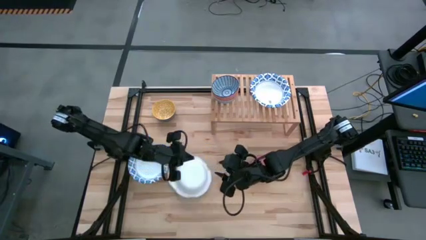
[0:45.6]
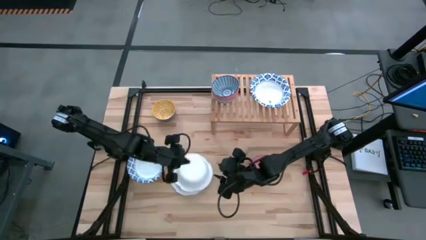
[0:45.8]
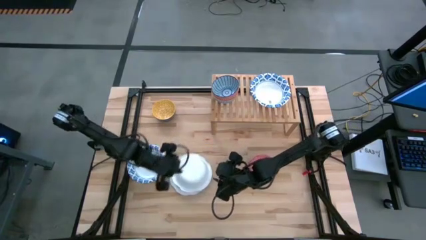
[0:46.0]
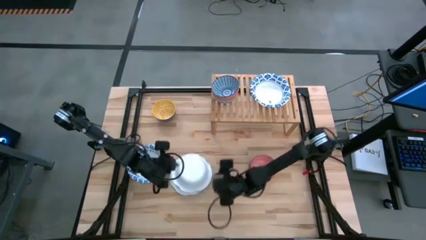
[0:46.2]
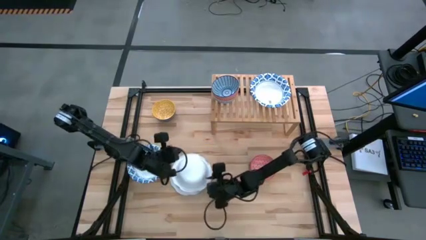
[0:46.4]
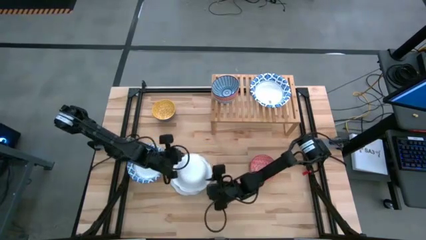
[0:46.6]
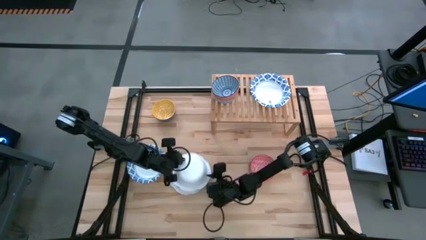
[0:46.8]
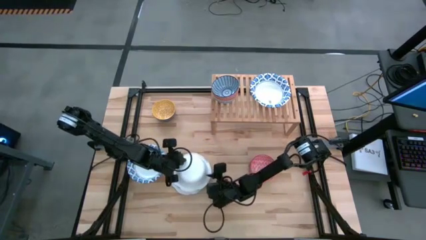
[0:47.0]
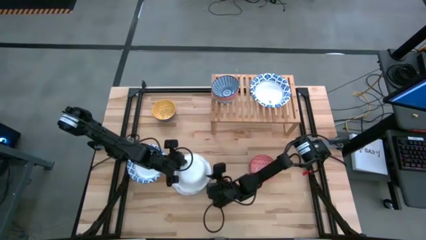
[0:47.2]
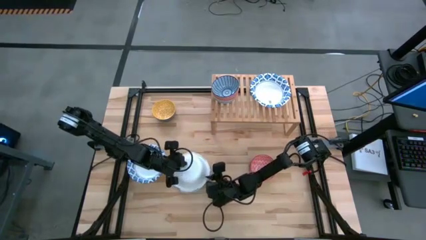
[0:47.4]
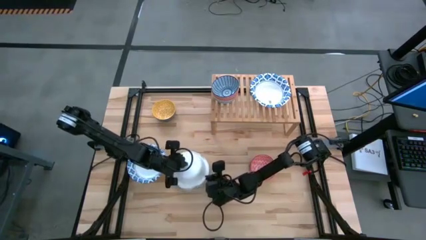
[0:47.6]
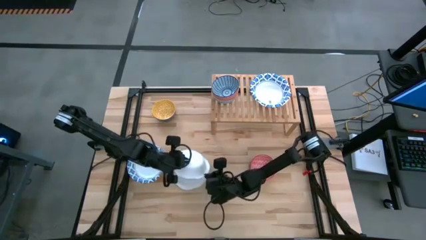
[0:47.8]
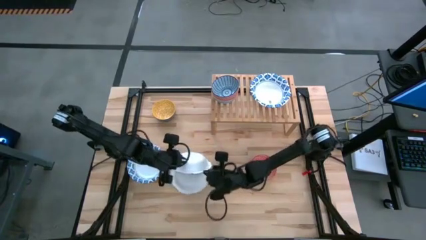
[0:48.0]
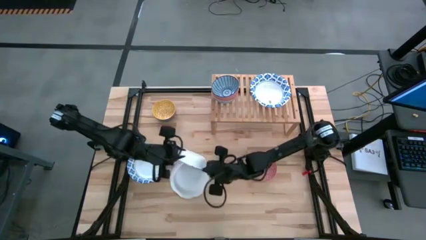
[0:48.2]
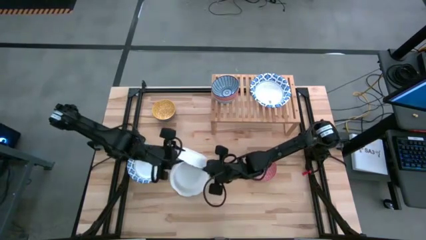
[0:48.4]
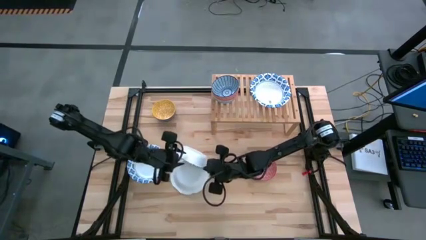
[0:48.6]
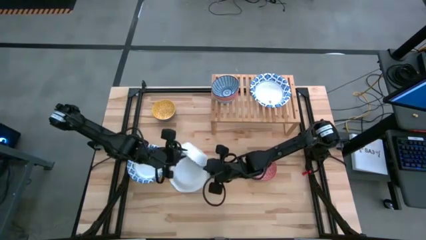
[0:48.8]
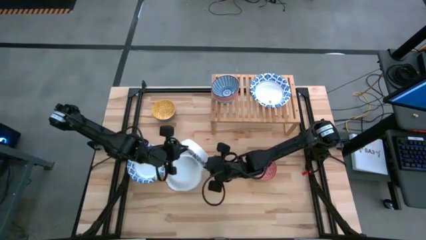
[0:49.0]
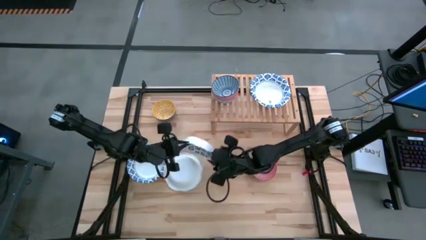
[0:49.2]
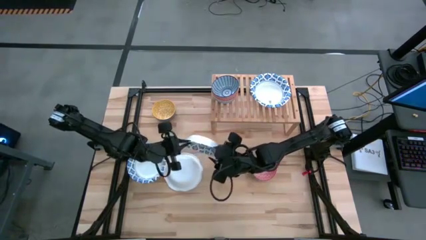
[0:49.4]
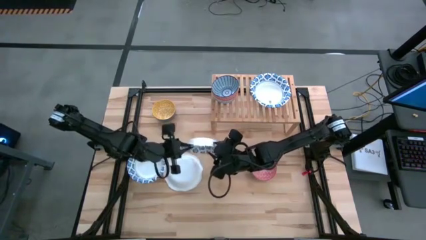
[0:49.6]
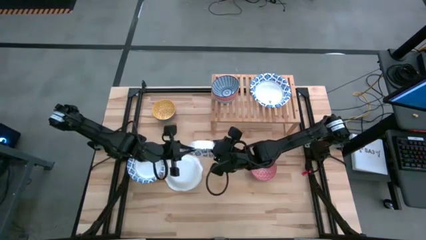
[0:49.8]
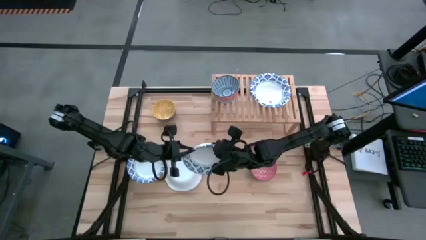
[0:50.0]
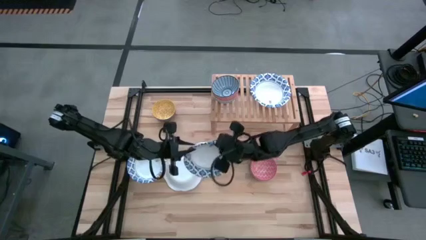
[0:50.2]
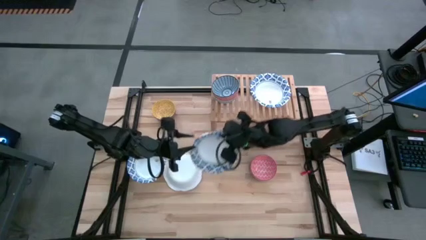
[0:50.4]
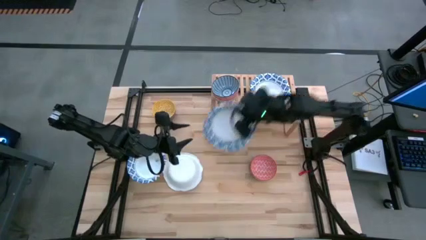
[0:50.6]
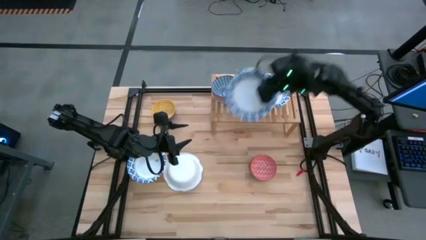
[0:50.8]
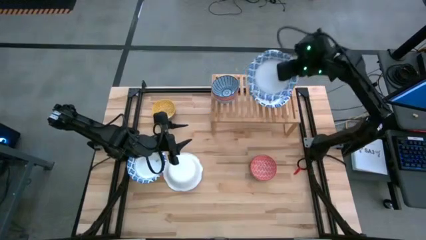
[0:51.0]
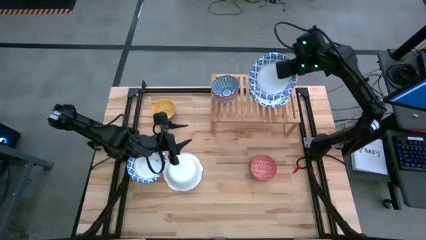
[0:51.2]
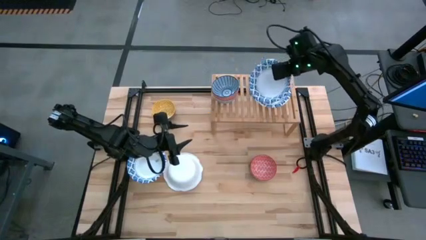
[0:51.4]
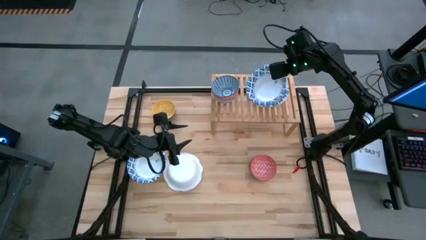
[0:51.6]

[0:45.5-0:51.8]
Task: Place and stack bowls onto a shelf
Stack the white patterned bowl on top of the white patterned bowl on the shelf

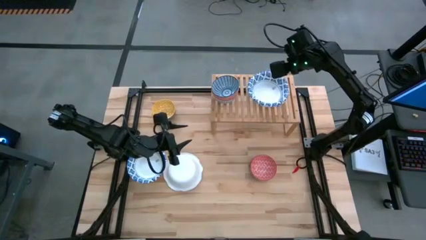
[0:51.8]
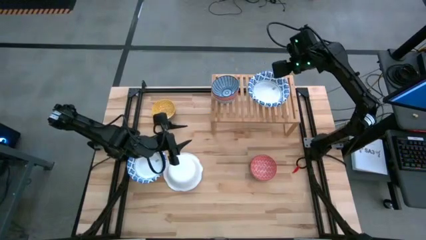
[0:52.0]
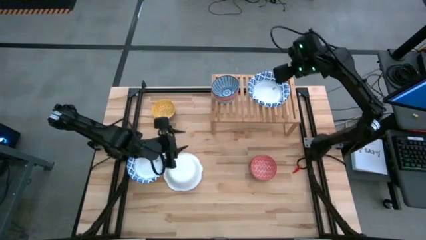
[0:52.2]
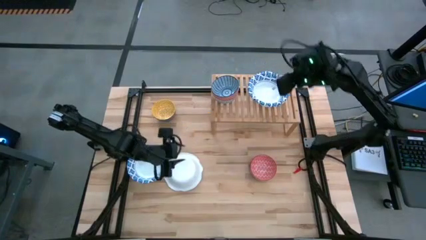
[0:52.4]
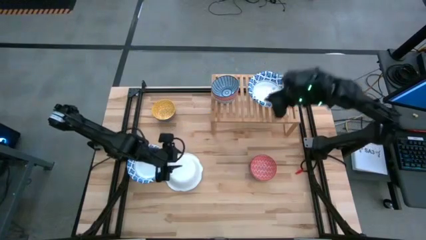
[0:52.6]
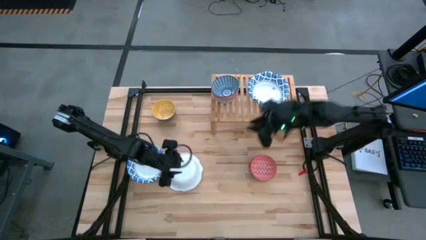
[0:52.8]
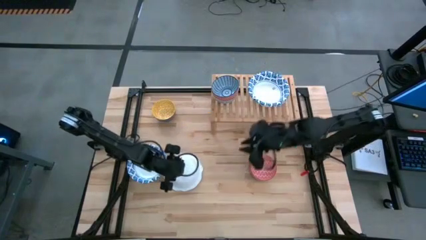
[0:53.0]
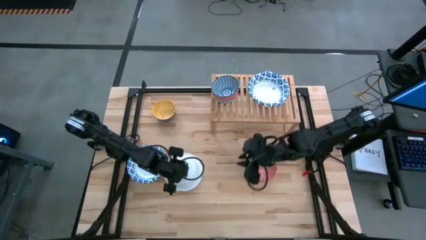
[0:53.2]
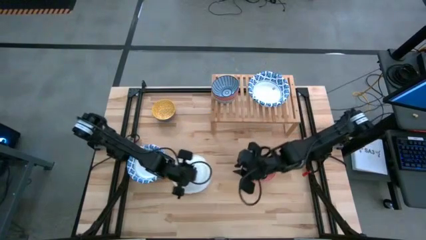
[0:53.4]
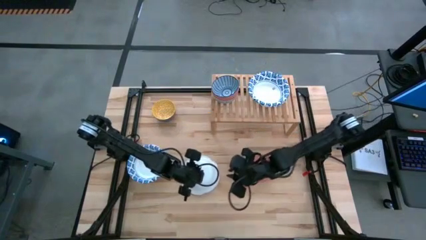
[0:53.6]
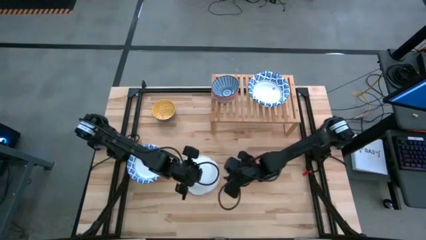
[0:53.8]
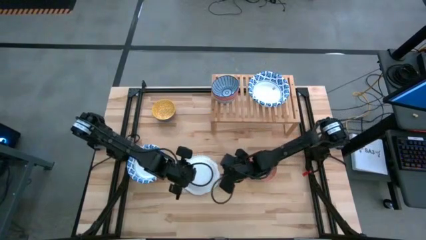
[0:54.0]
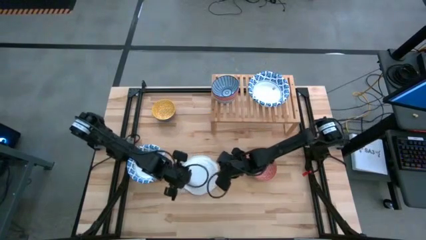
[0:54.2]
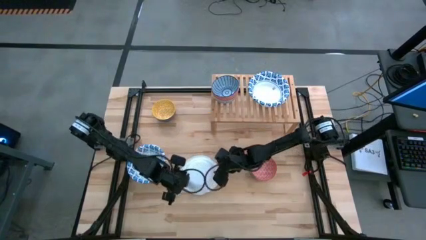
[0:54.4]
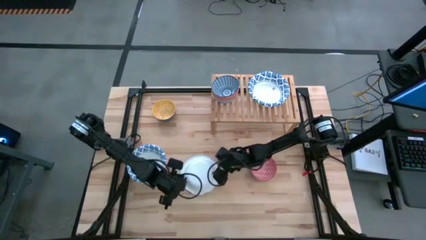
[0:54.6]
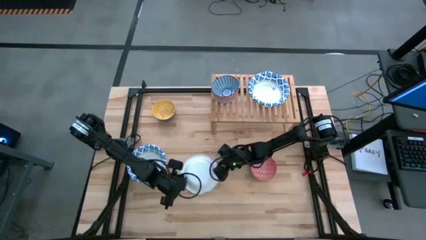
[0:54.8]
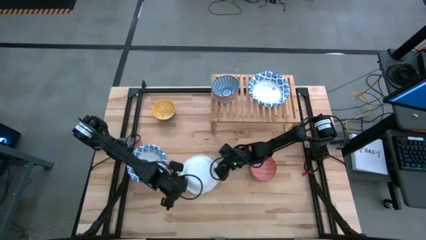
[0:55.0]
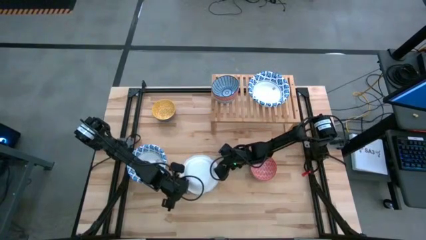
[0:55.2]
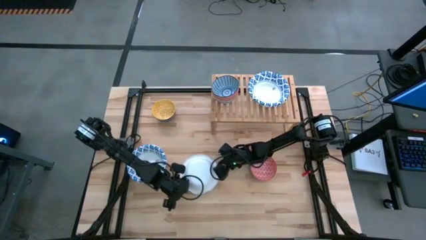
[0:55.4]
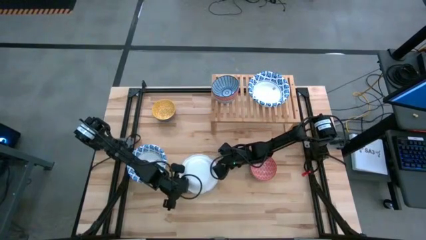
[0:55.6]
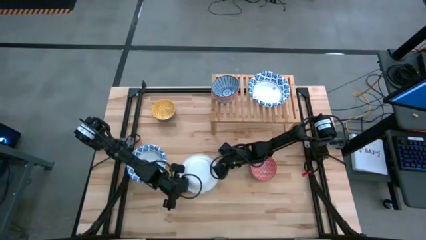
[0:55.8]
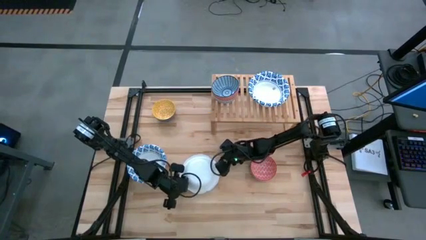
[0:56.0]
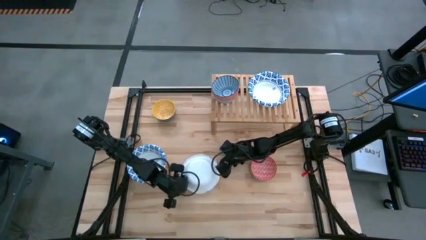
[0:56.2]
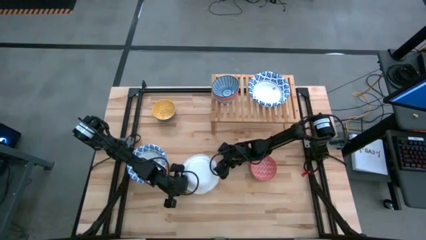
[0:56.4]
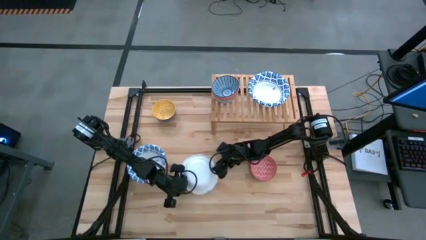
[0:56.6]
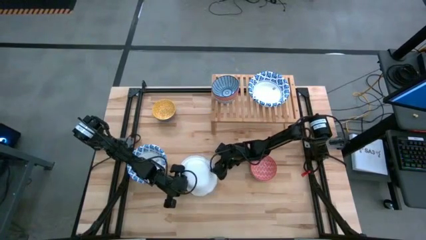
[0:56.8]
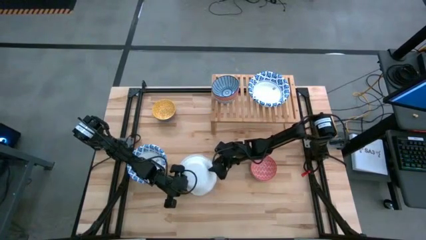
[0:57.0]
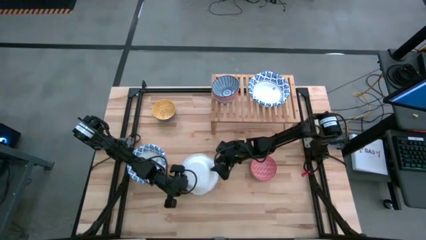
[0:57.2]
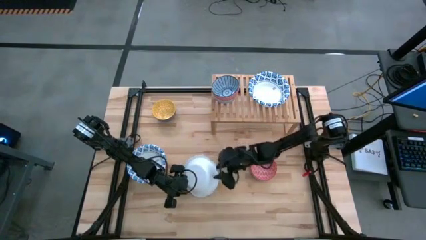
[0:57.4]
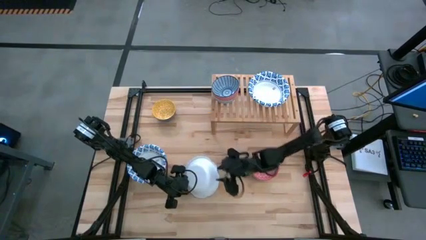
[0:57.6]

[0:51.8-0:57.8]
Stack the white patterned bowl on top of the white patterned bowls on the shelf

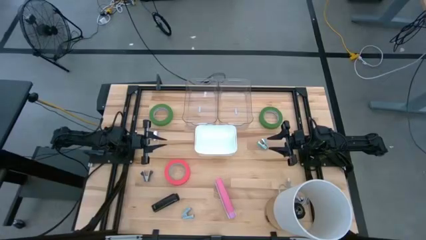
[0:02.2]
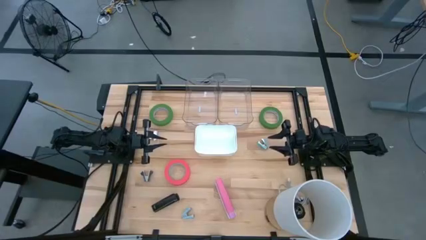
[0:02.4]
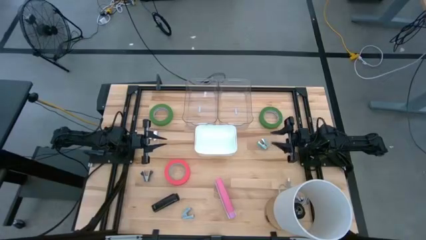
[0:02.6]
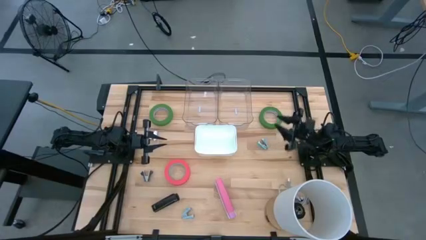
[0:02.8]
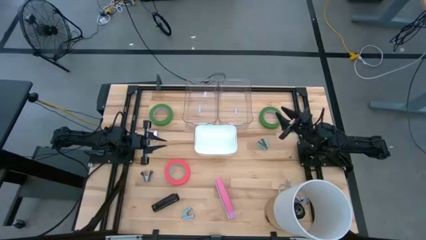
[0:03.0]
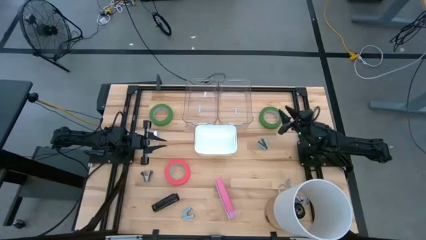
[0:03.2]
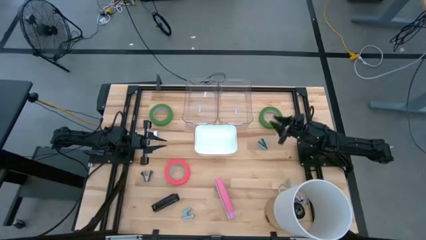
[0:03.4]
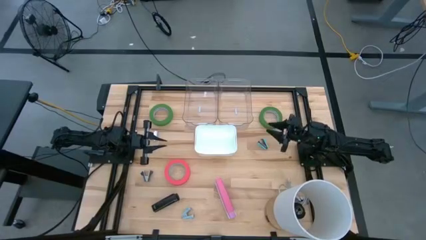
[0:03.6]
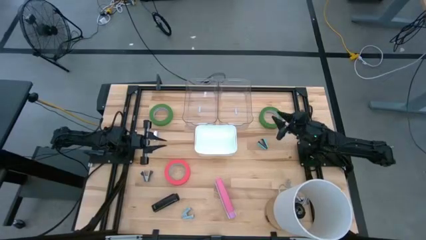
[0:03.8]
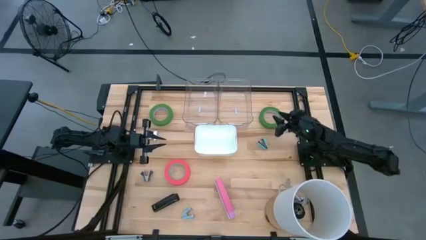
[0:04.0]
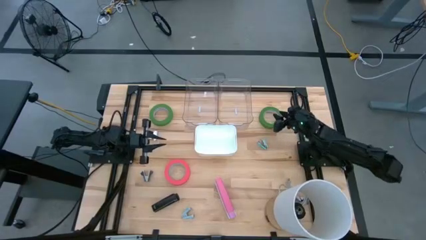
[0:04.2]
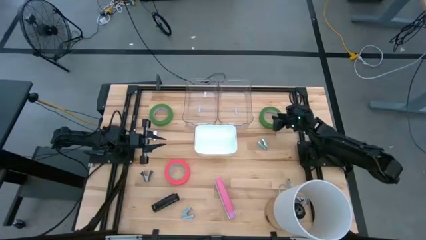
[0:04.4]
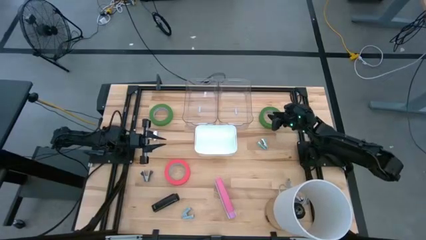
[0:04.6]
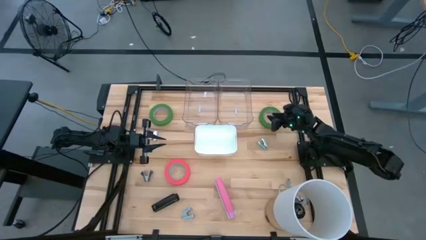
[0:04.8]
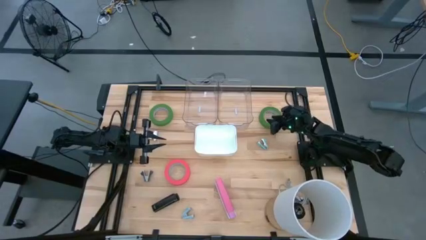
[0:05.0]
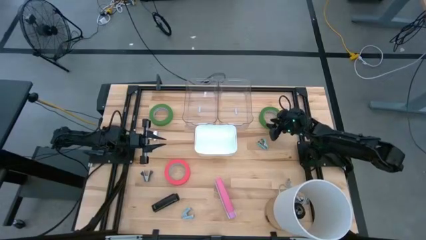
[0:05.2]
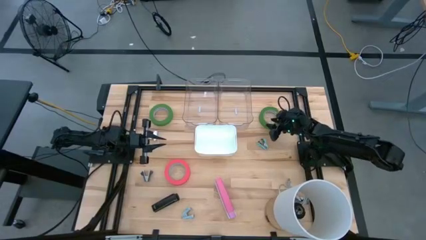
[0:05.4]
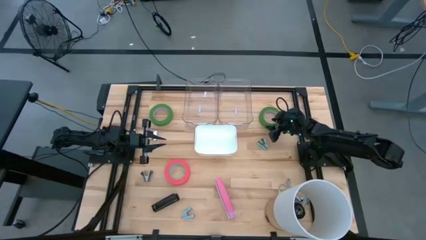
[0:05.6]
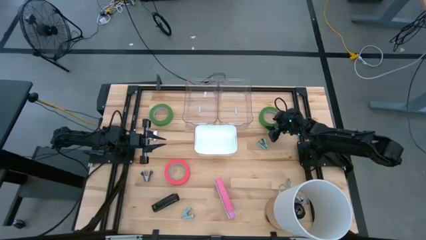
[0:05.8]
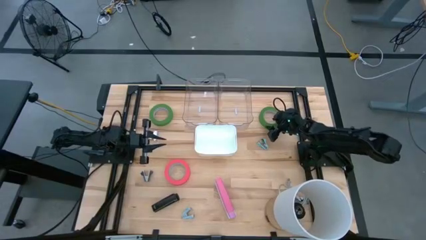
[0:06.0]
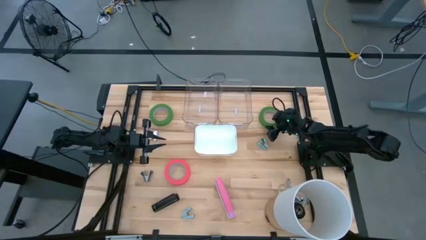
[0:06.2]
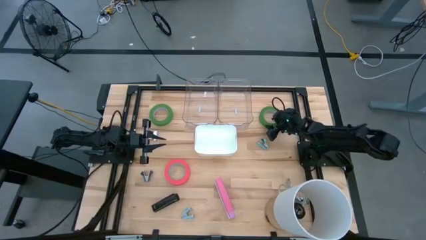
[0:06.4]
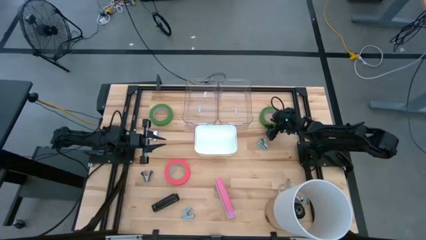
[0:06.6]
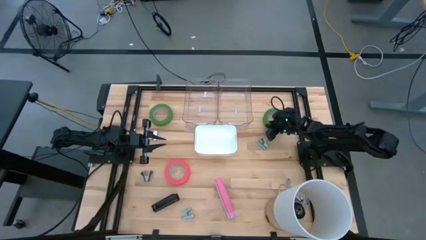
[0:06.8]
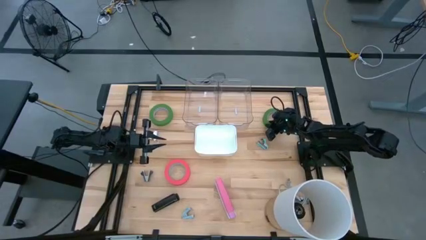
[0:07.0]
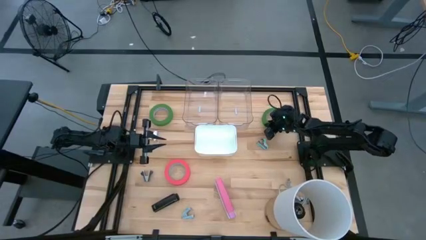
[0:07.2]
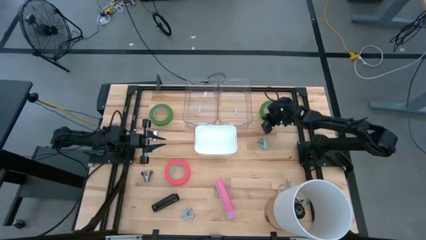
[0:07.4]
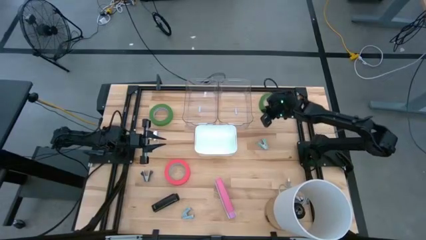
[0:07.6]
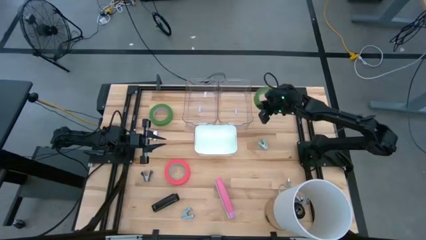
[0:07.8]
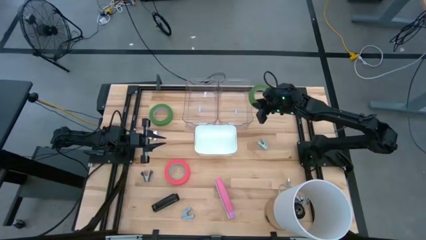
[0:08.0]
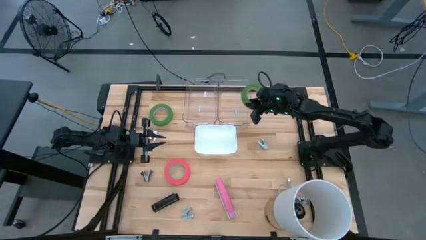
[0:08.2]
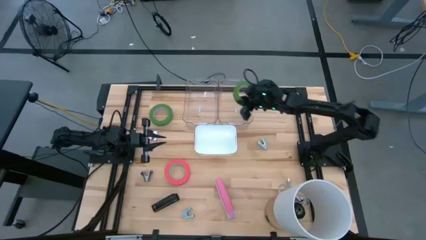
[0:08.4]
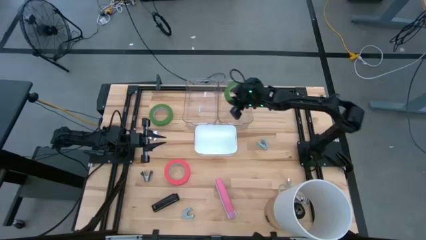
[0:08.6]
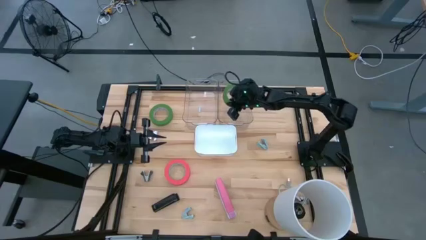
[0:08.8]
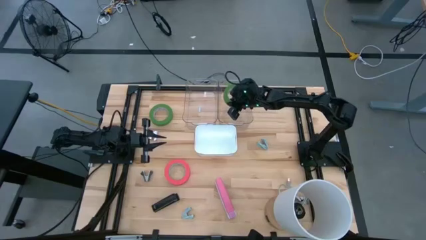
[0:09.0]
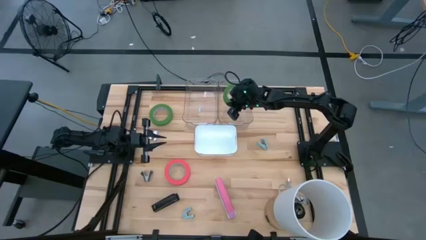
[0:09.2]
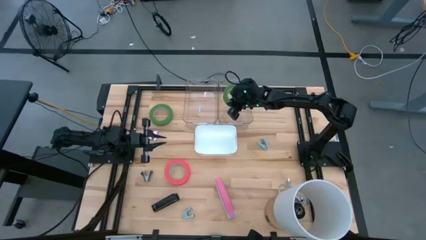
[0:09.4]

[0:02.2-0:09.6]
Task: Pick and place Stapler, Stapler remover, tape
Put the right green tape into the right transparent bin
